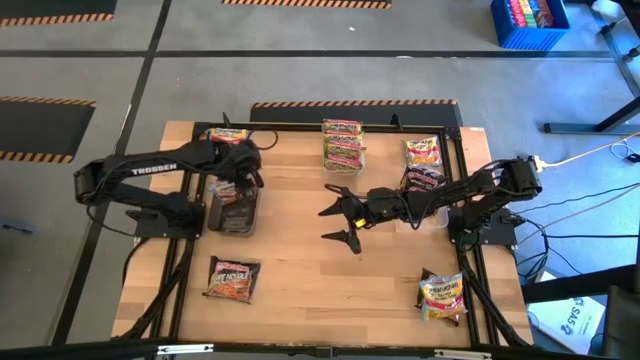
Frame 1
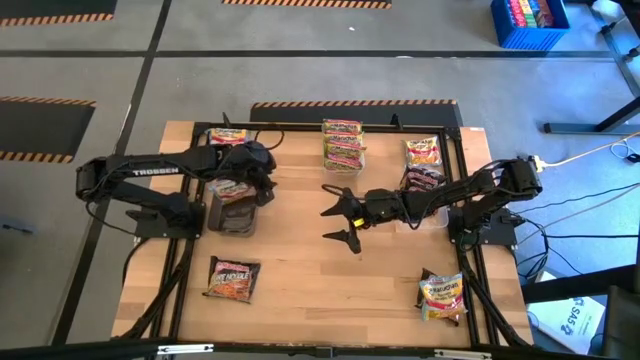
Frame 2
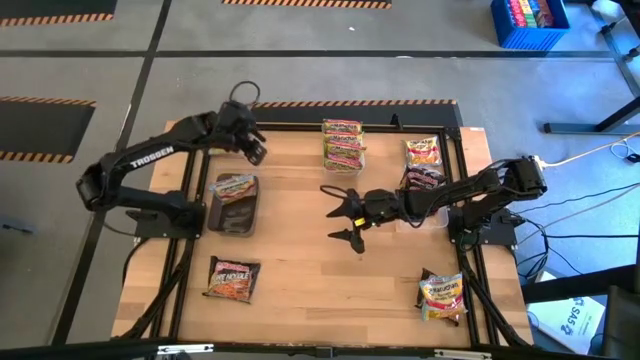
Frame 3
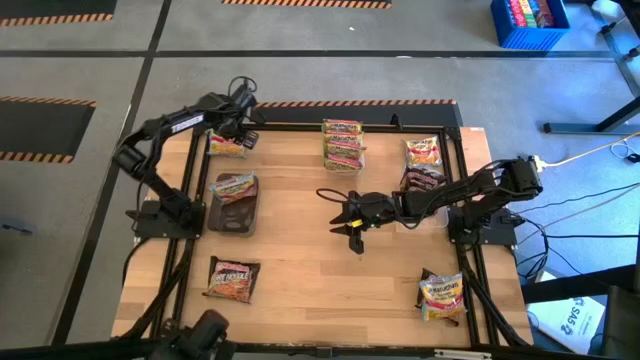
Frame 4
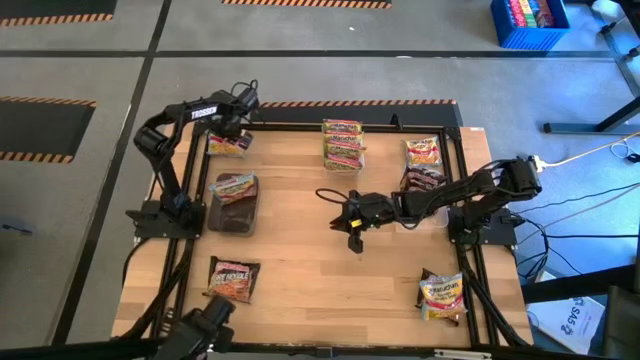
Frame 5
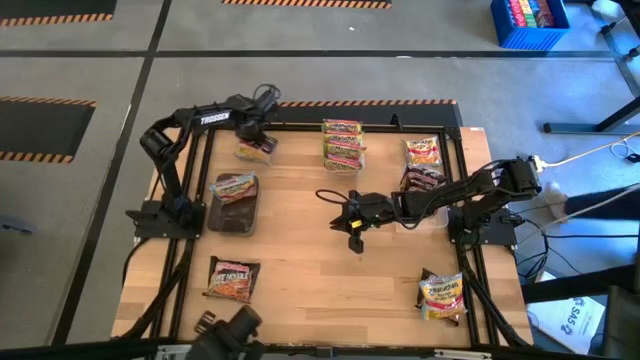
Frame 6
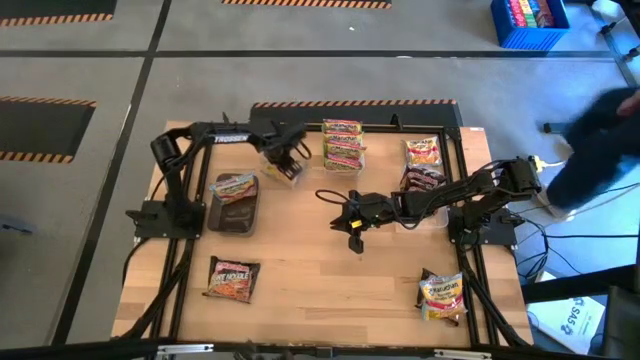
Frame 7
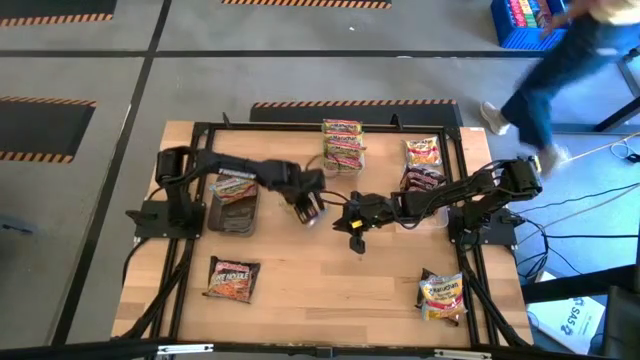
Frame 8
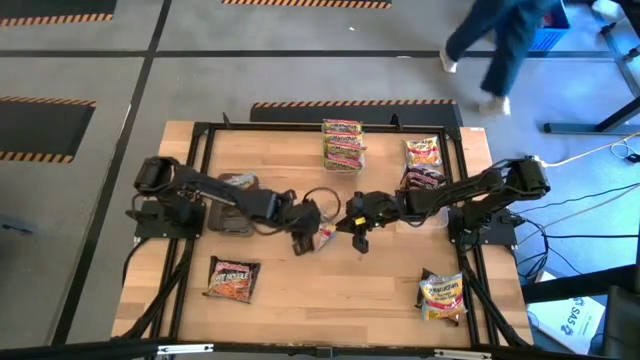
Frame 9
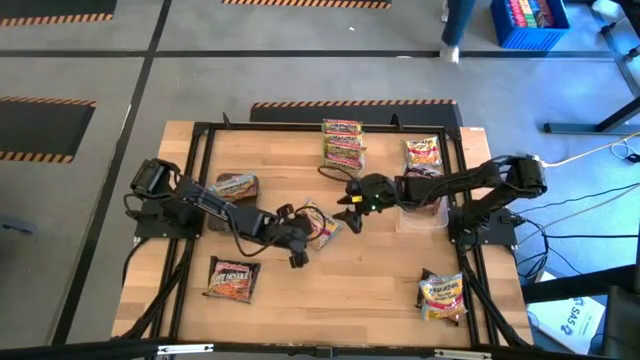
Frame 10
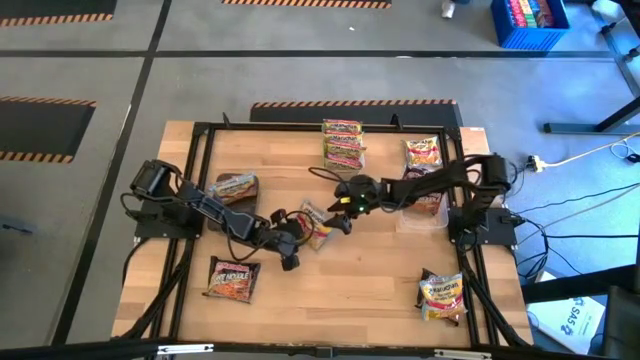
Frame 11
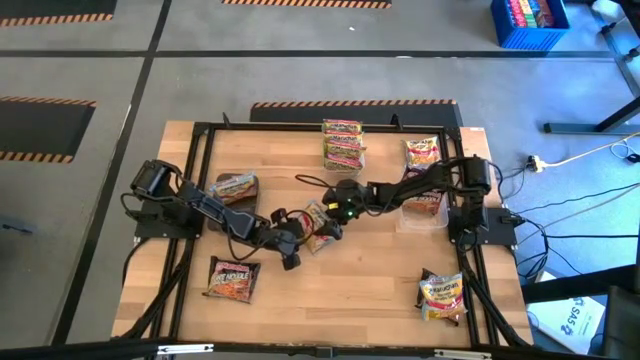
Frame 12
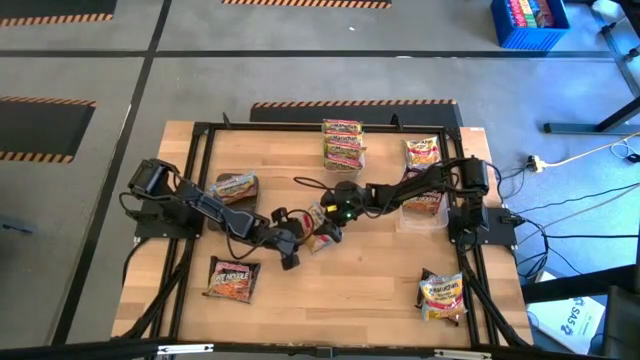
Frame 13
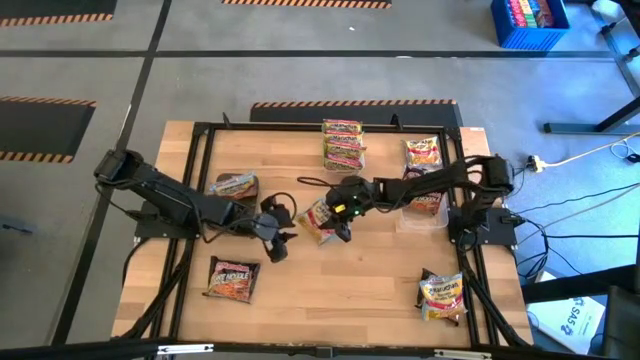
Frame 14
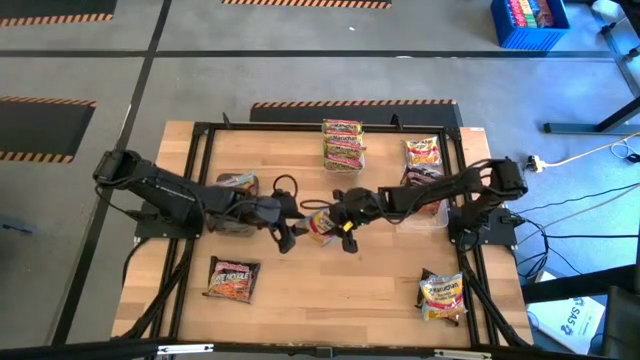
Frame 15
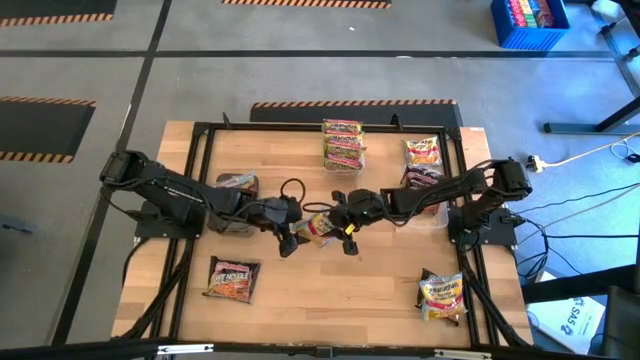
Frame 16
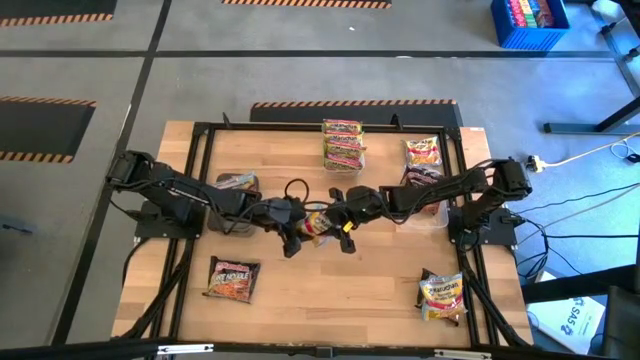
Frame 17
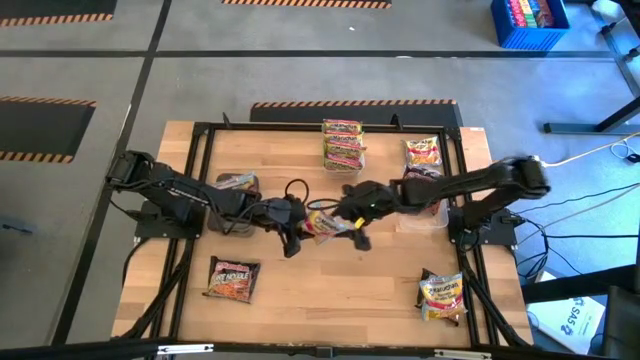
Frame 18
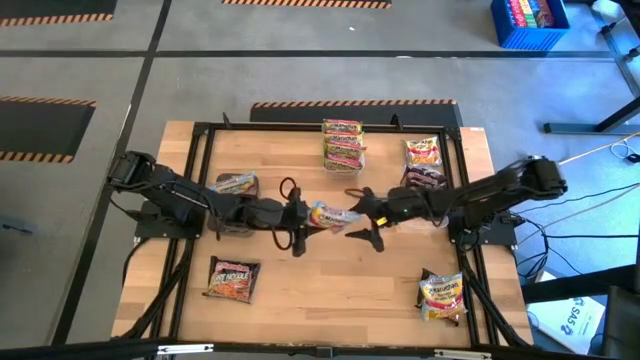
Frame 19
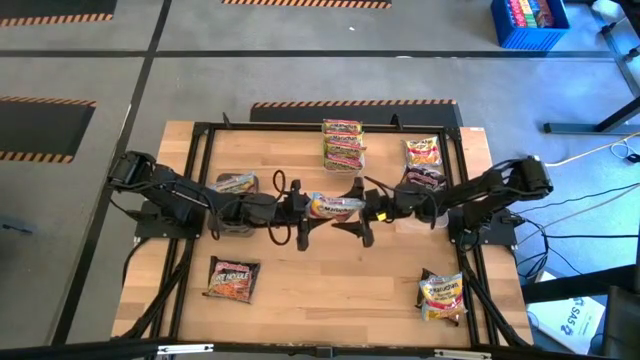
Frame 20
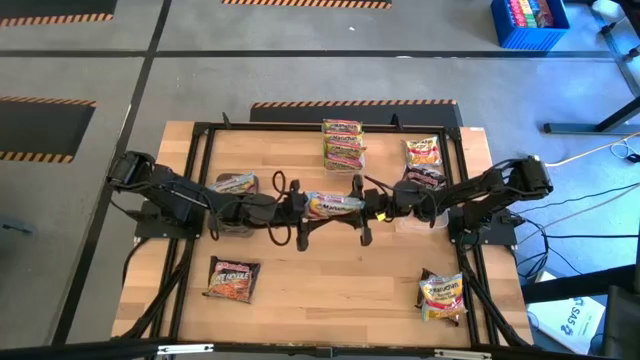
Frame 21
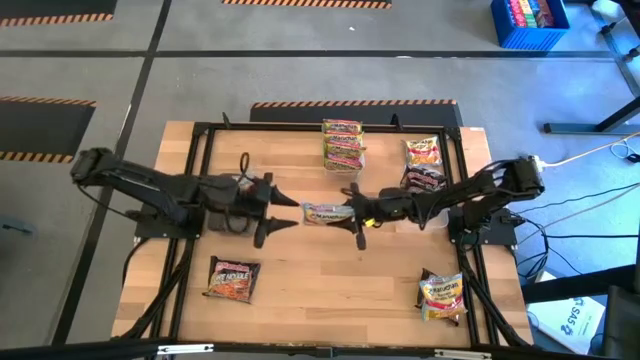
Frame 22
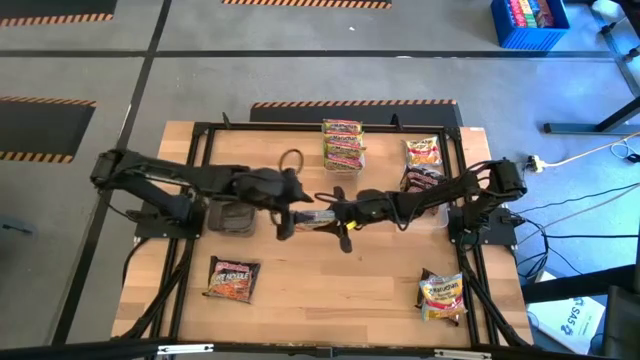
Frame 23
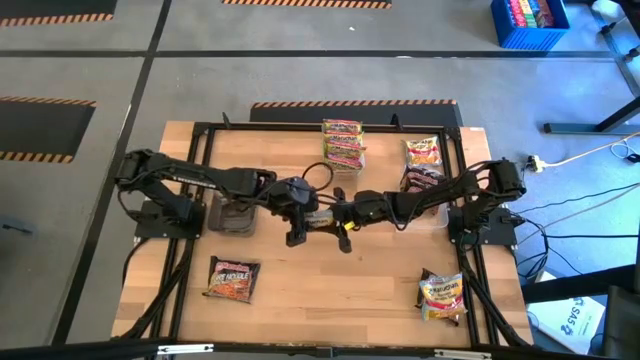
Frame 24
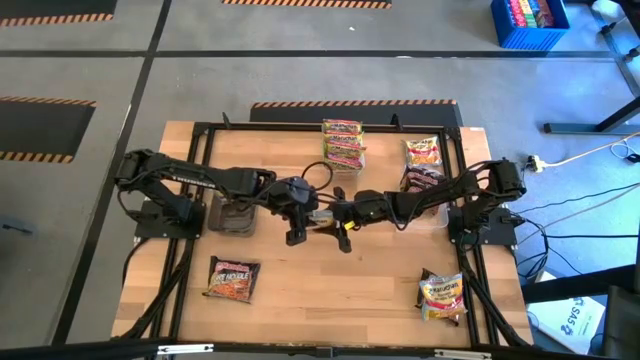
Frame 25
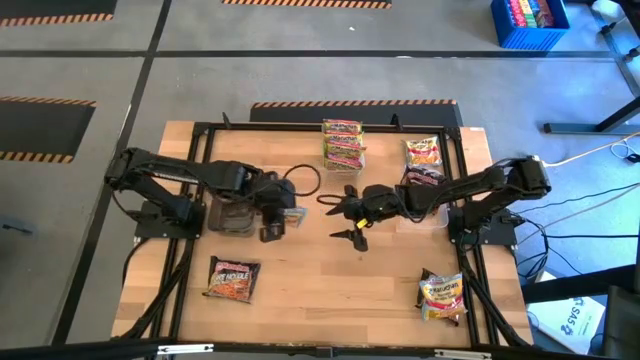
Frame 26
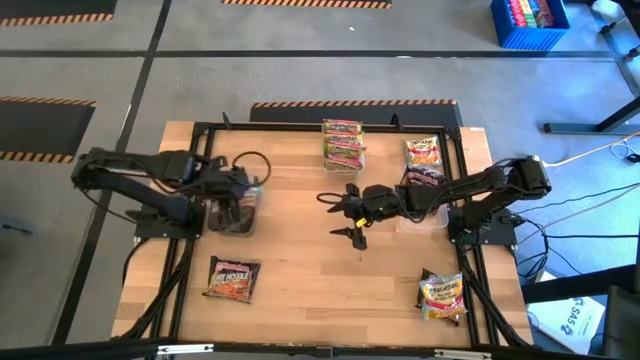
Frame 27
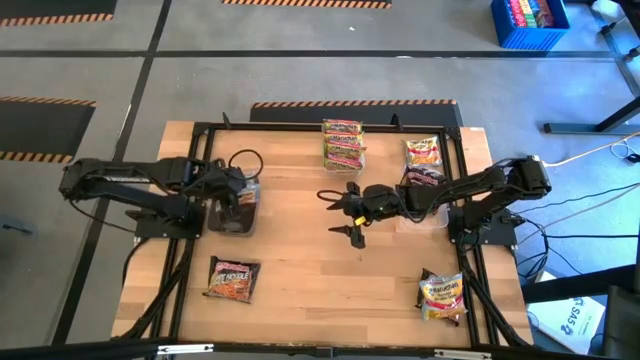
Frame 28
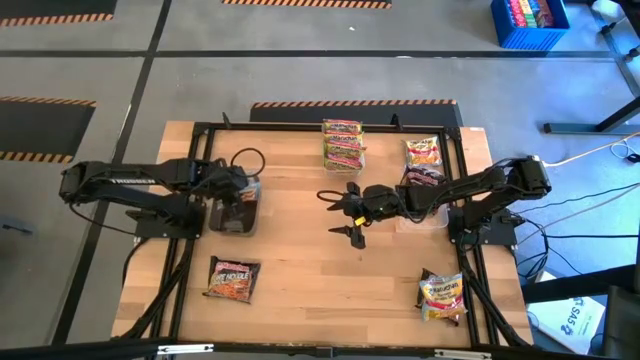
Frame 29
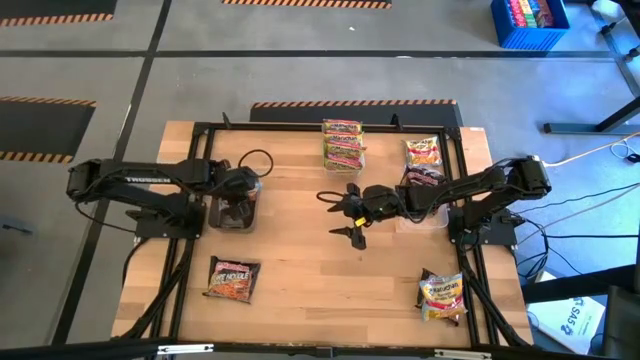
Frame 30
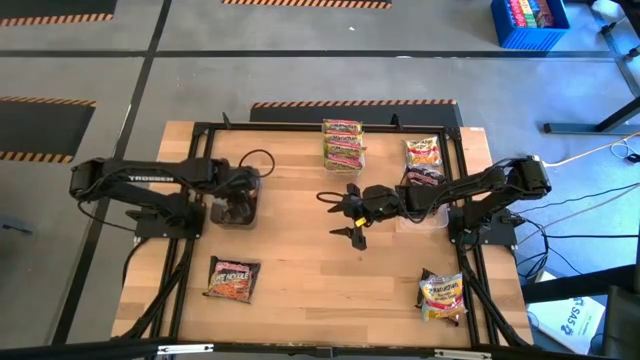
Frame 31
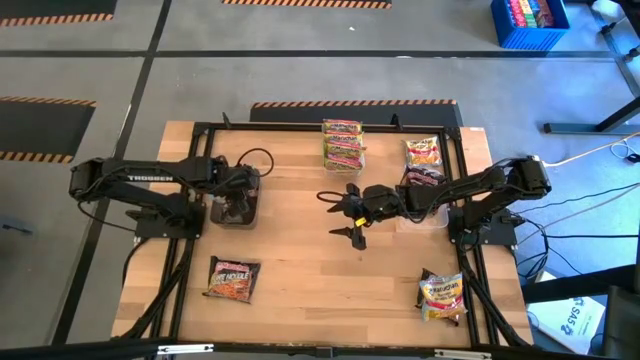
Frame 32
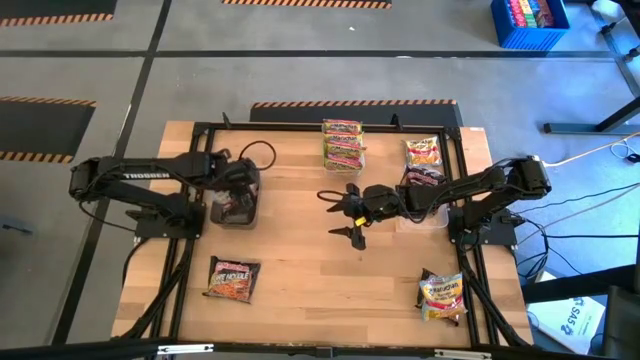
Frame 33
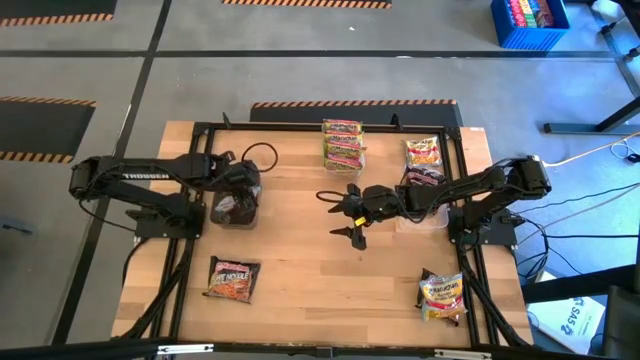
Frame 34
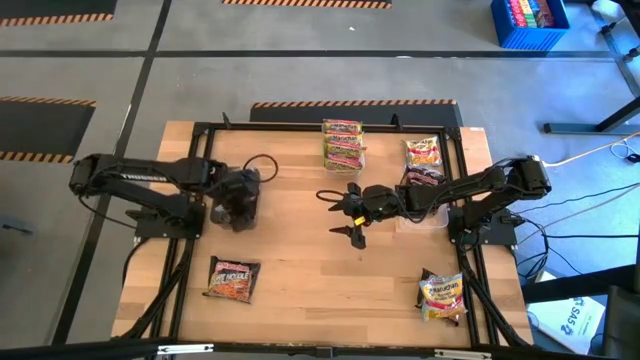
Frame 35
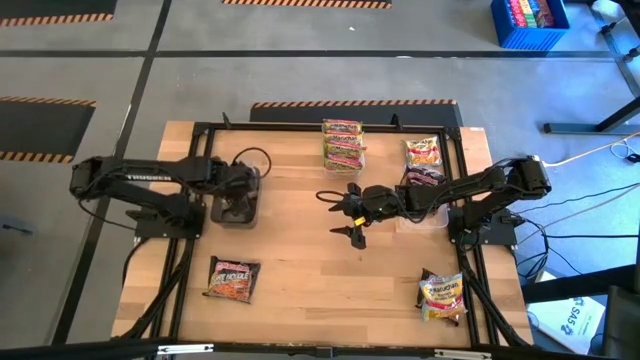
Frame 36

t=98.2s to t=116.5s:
Task: Sort Maruchan noodles
Put the top left blue noodle pack into the black bin

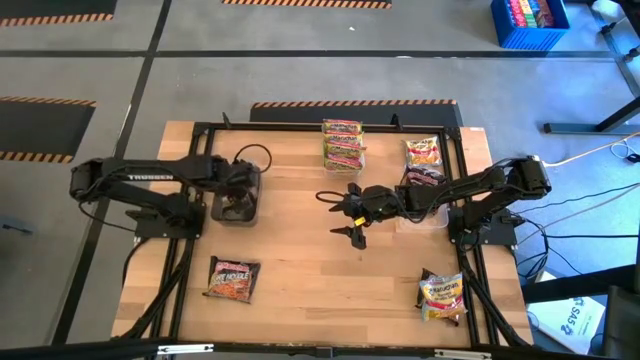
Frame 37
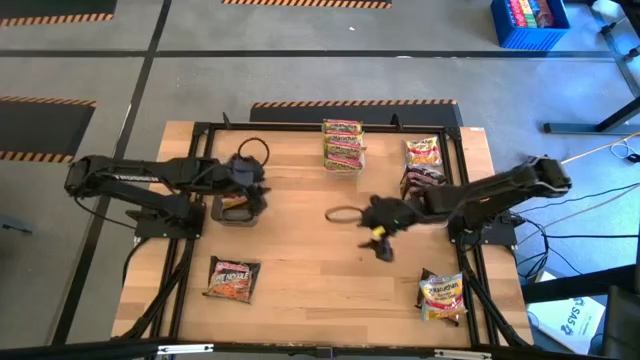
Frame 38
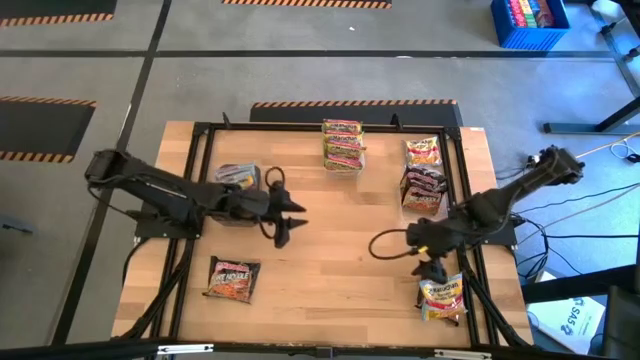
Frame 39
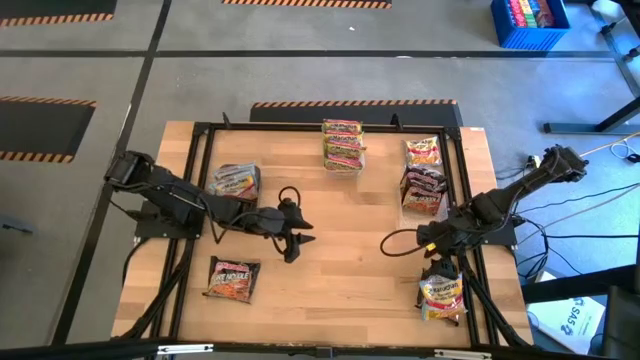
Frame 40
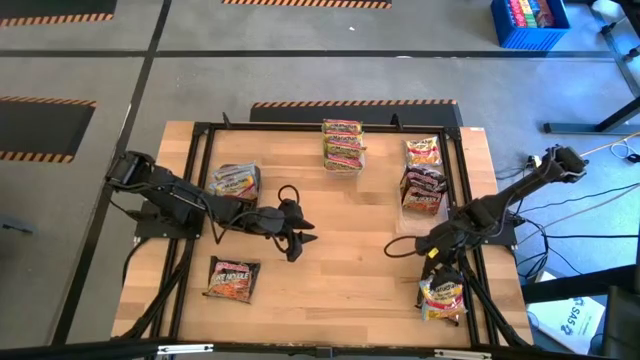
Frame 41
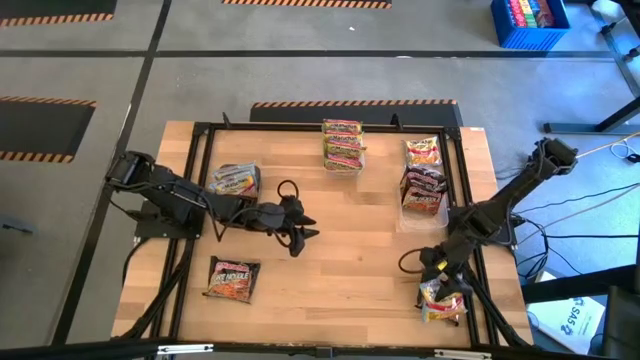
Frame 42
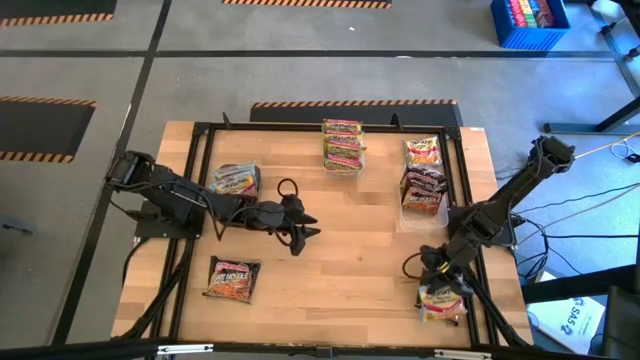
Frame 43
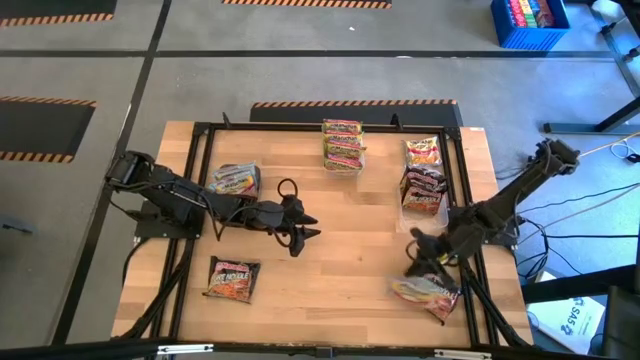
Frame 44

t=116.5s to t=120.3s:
Put the bottom blue noodle pack into the black bin
